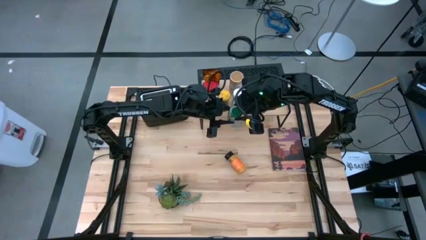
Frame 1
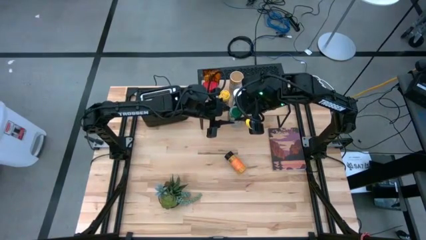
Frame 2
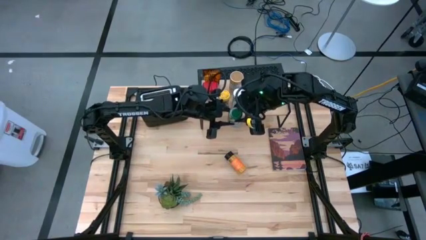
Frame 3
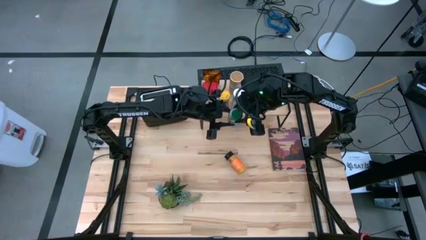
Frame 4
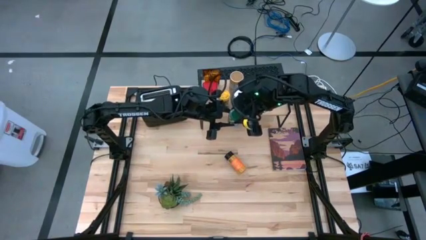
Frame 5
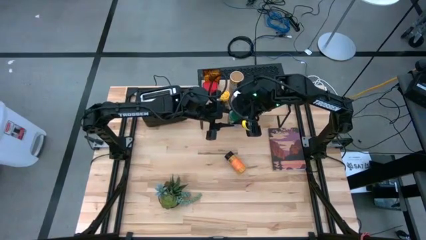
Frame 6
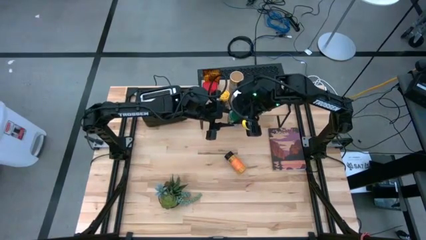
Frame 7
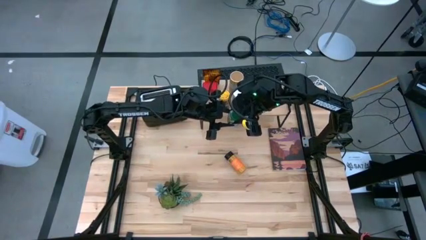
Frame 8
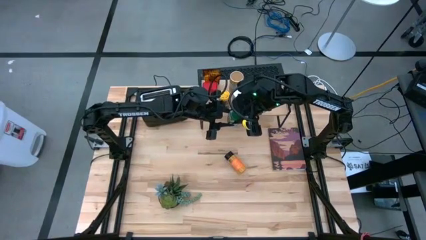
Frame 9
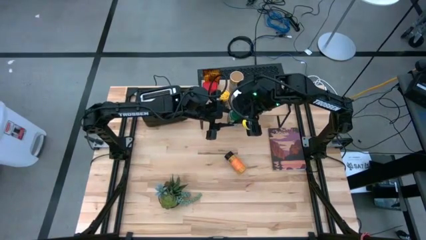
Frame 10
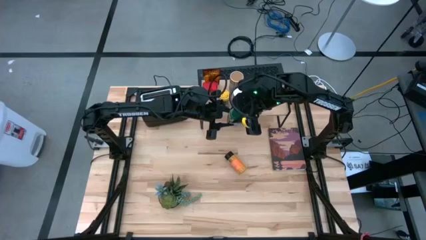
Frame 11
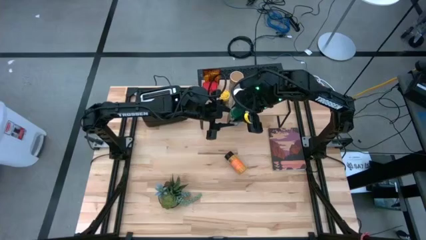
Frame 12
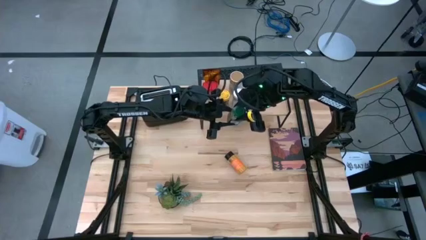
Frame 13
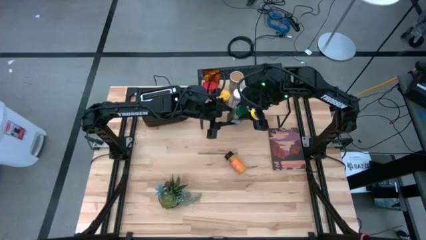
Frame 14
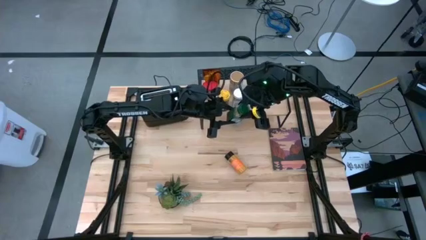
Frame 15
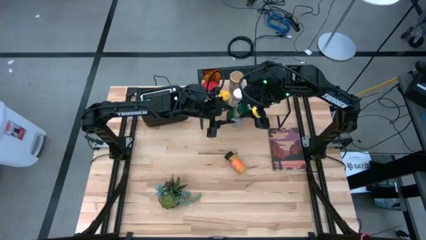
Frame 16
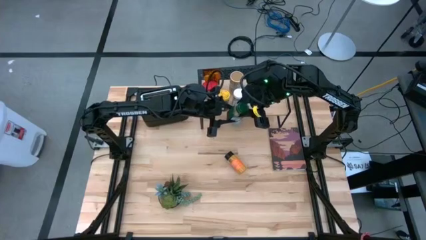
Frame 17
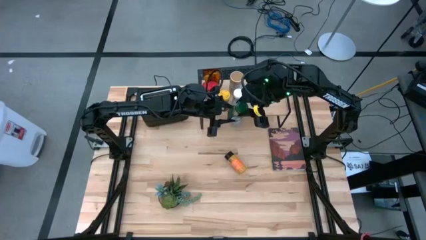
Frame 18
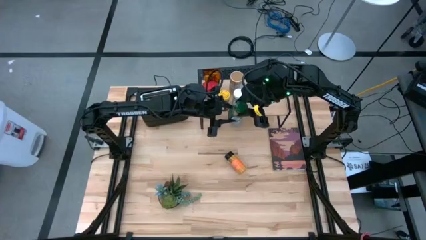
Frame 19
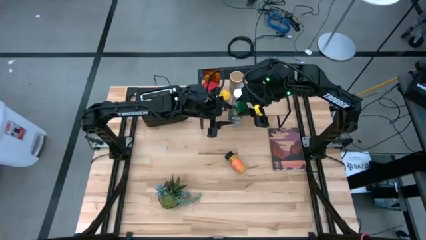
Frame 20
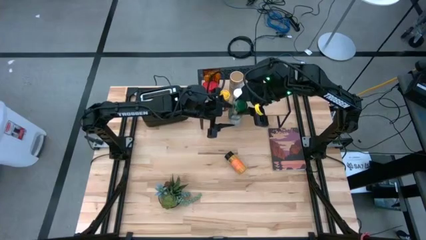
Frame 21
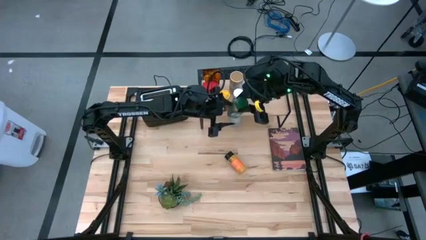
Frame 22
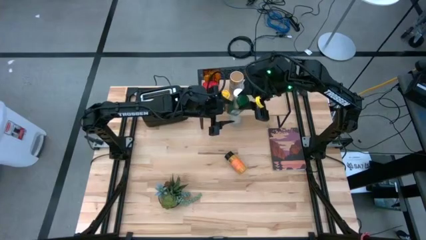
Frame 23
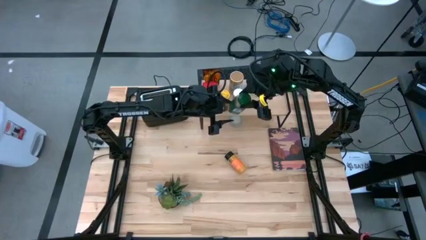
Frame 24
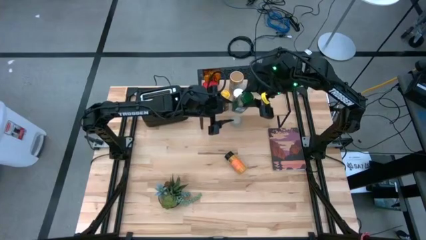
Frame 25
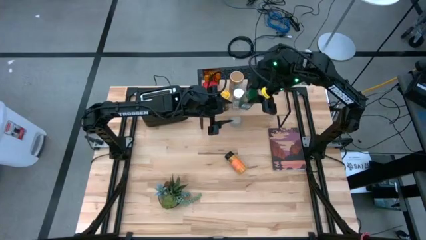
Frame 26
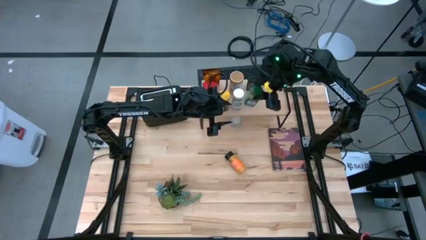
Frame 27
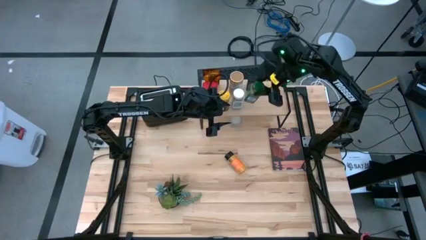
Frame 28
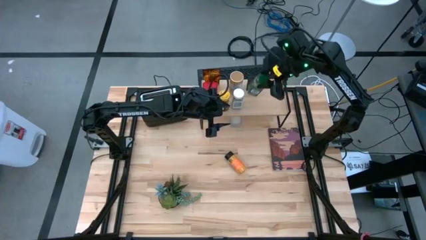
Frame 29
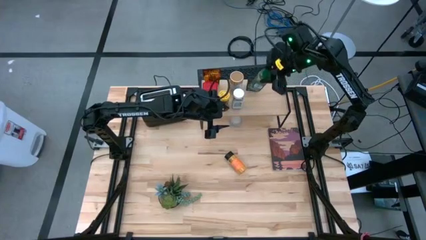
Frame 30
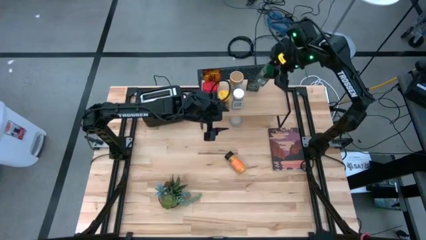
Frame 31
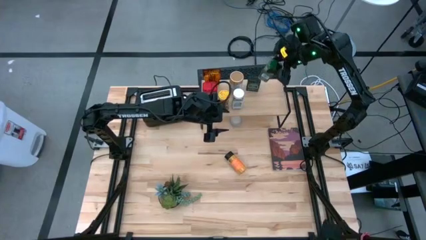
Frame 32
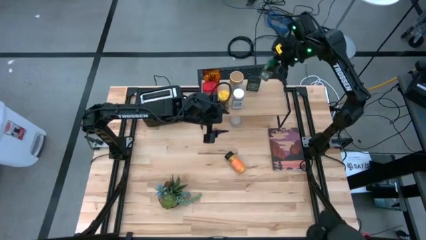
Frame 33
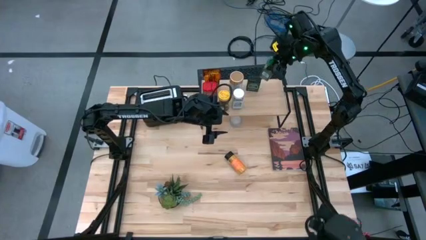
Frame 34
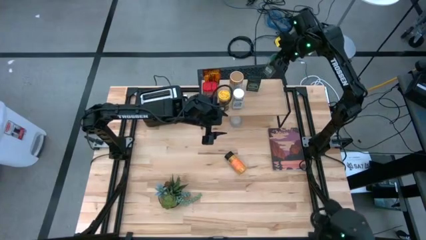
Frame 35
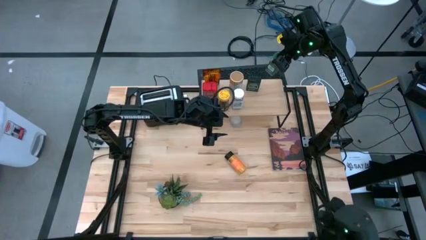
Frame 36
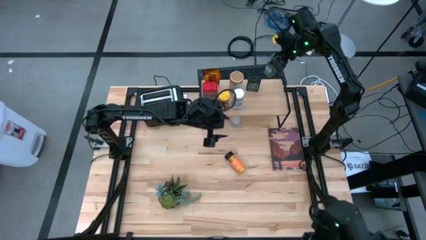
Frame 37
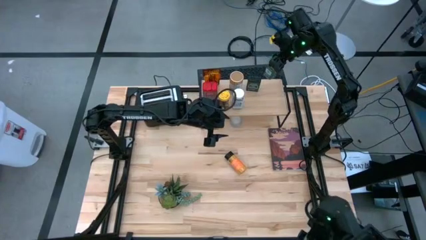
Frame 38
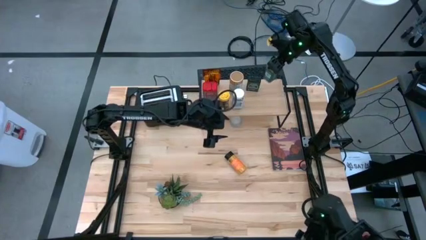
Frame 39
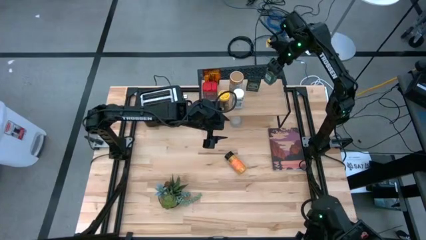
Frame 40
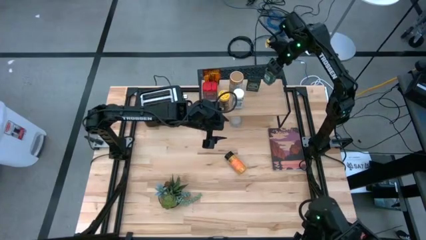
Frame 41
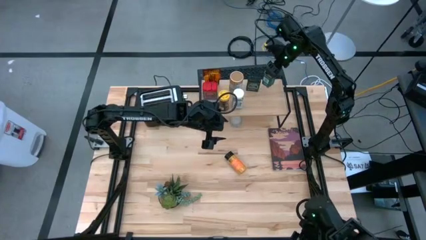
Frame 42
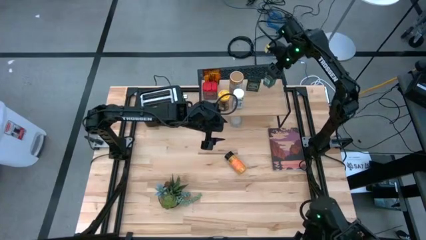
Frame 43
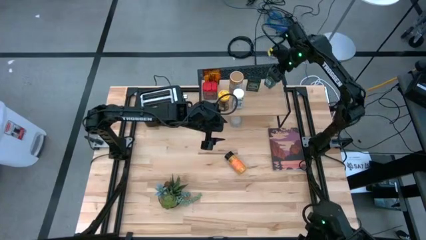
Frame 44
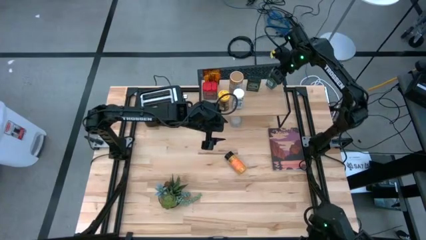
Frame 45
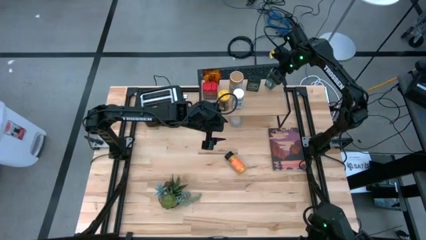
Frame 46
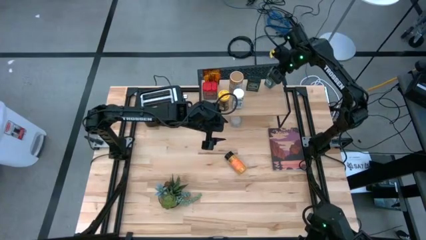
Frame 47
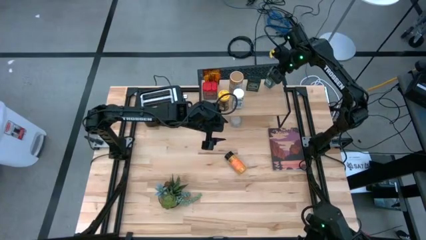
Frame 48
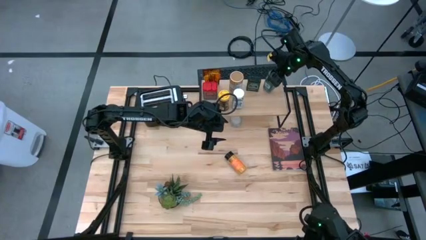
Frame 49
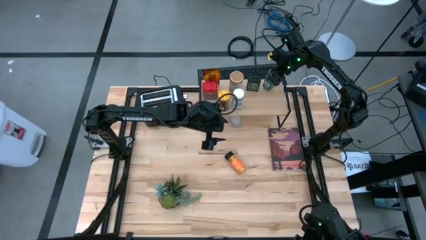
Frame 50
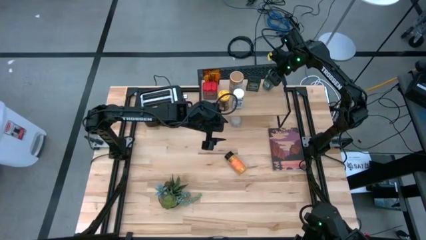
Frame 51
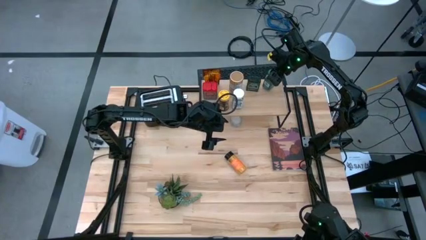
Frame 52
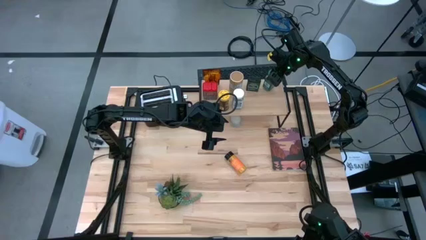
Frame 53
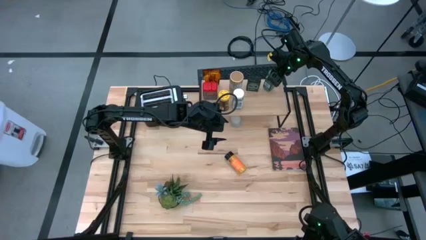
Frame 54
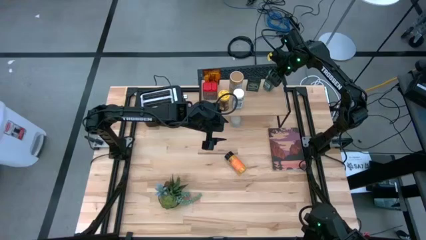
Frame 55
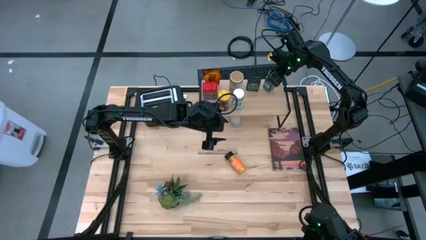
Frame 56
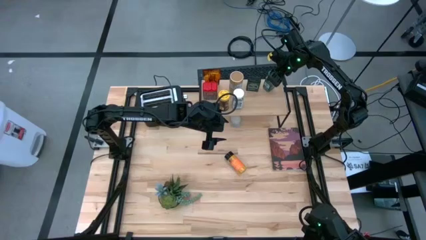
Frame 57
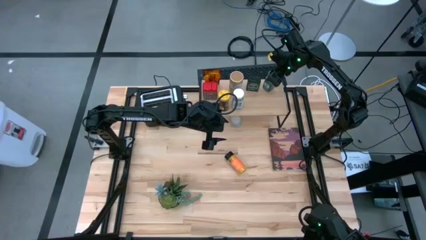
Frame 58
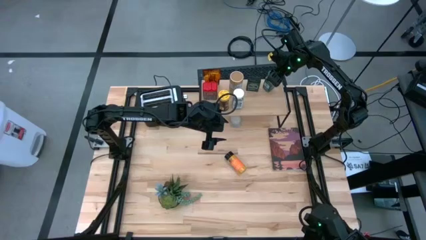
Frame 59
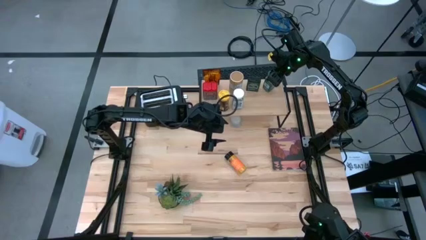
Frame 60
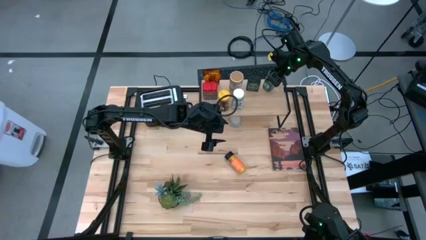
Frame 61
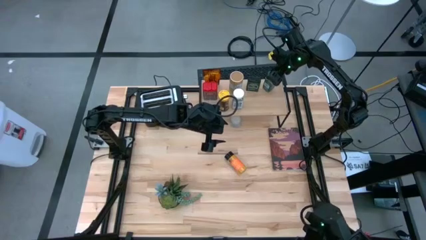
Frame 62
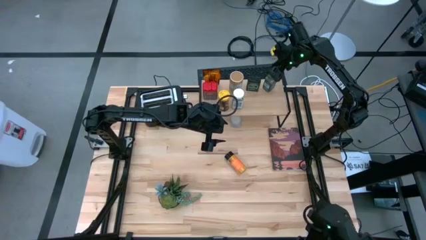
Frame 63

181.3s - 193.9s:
Task: Shelf spices
Put the green seasoning bottle on the shelf

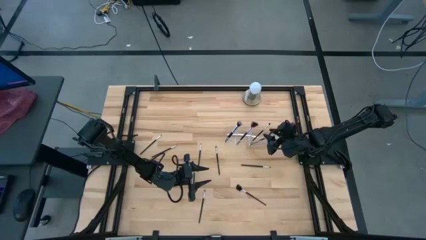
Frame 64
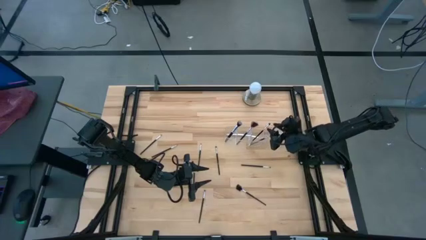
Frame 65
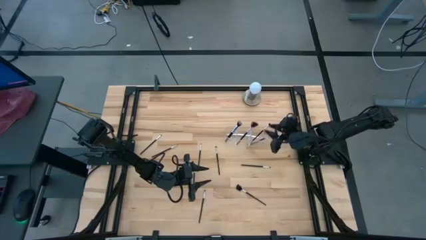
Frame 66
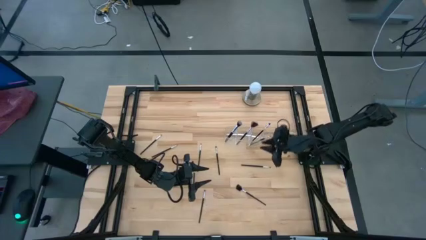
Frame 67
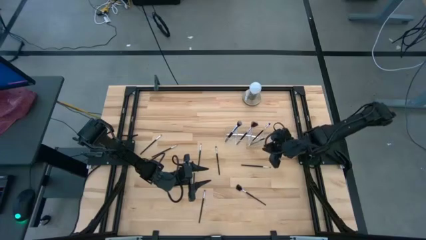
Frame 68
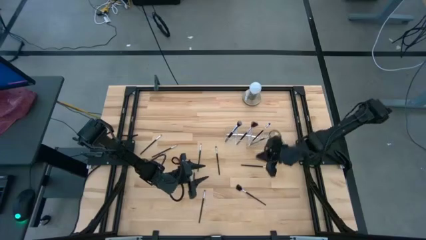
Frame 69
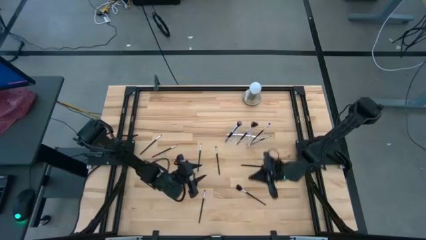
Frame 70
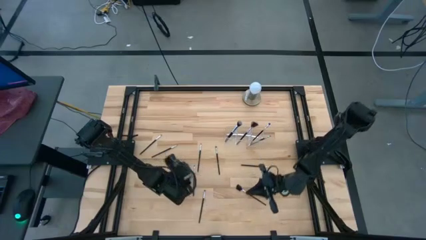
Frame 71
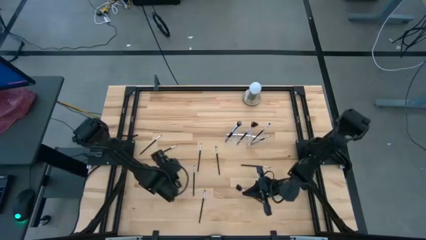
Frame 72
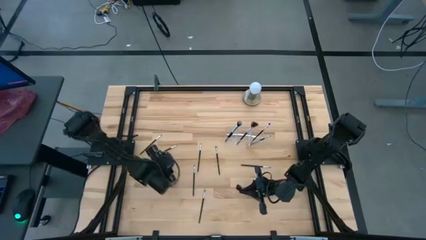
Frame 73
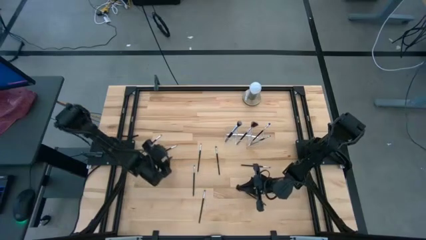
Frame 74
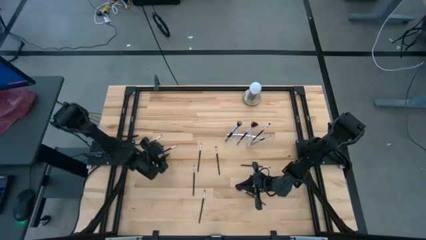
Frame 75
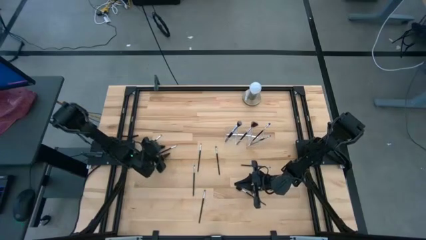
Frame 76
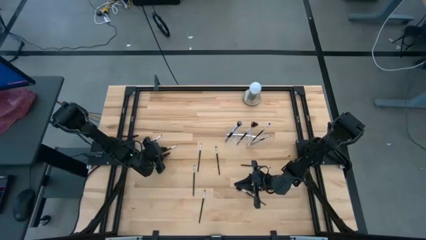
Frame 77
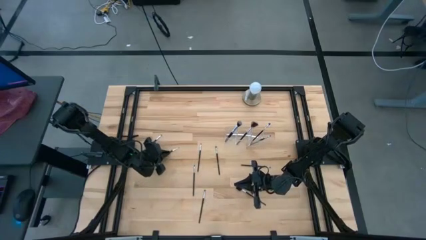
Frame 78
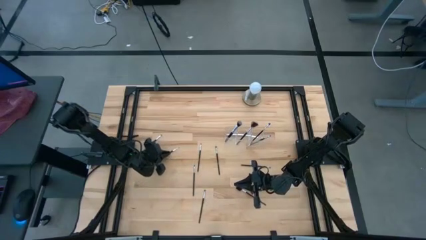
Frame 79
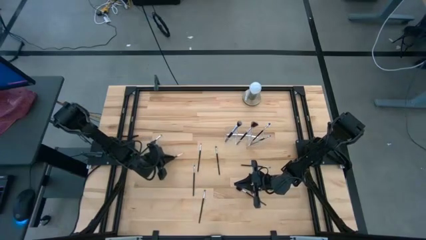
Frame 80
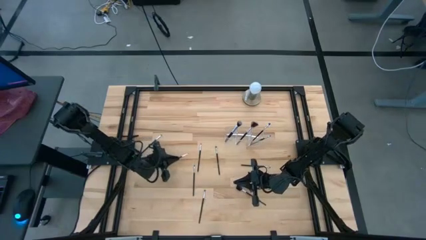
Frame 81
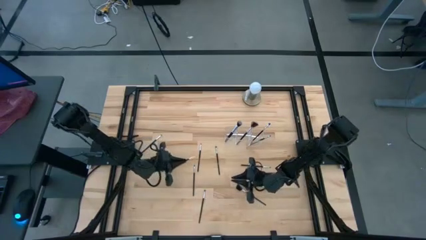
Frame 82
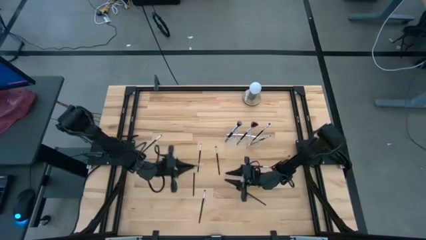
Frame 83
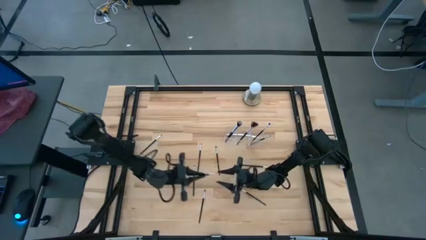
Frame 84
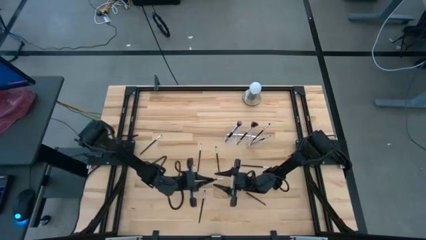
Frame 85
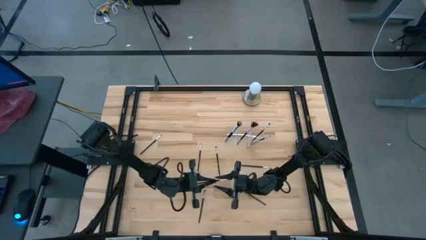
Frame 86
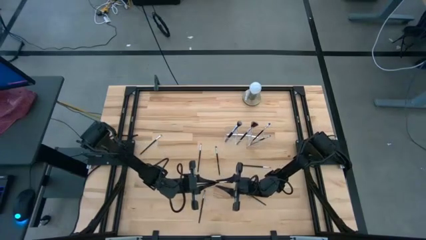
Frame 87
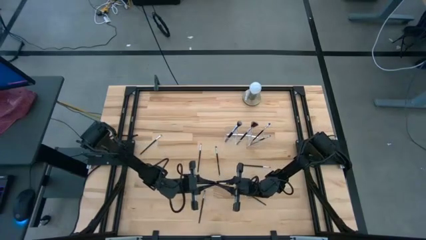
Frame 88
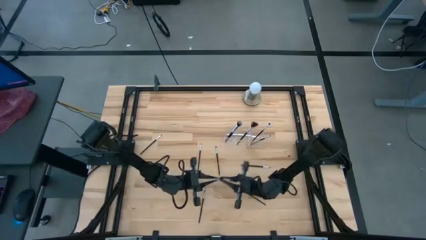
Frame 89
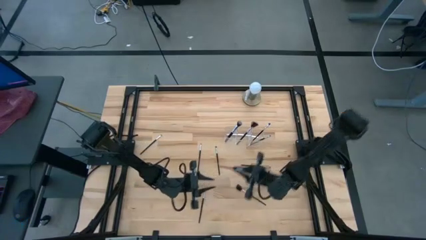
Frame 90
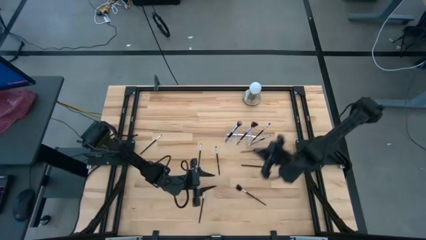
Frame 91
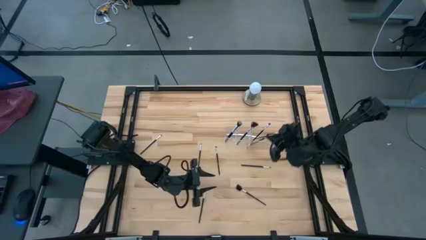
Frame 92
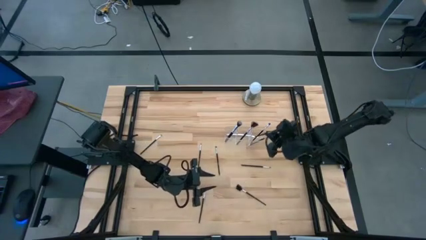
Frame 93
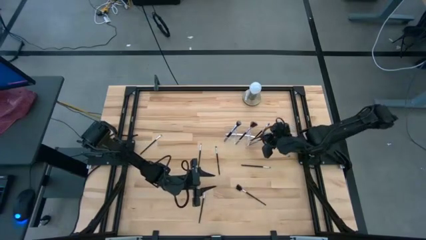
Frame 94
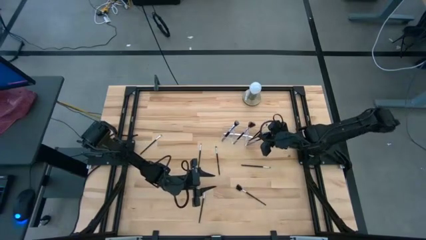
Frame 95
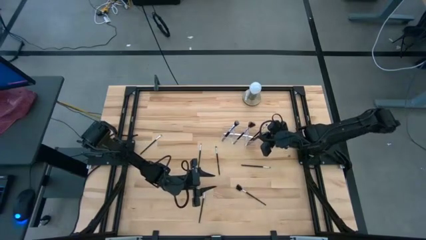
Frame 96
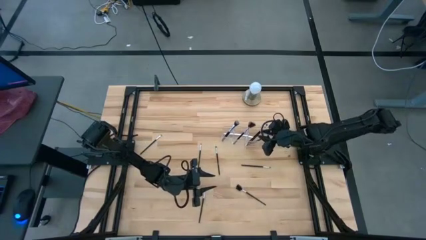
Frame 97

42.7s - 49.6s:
Task: Put items in baskets/containers
Put the black liner brush into the transparent organizer
